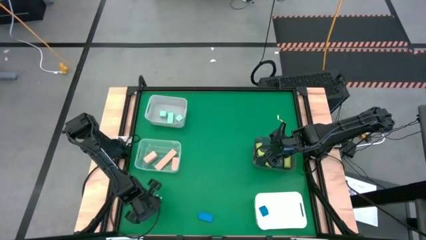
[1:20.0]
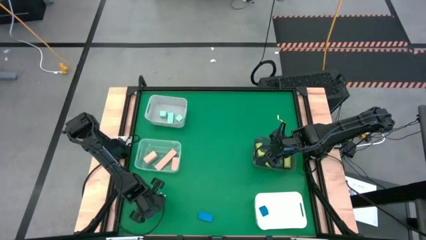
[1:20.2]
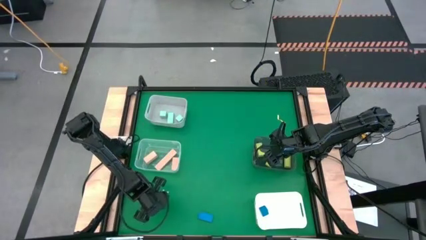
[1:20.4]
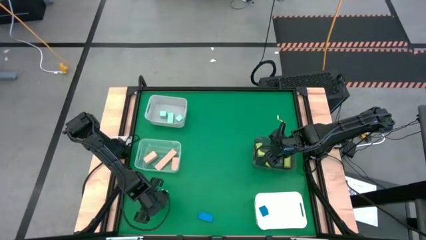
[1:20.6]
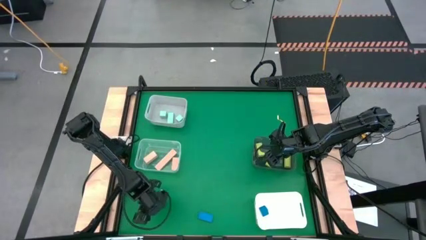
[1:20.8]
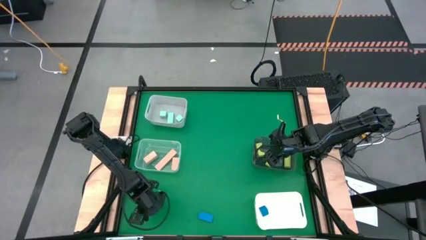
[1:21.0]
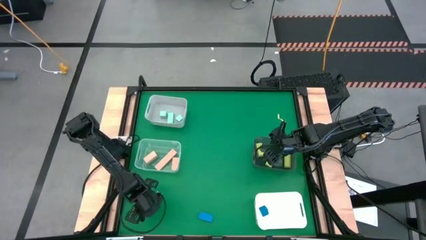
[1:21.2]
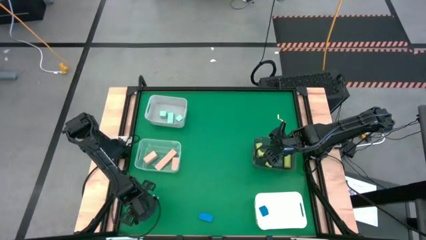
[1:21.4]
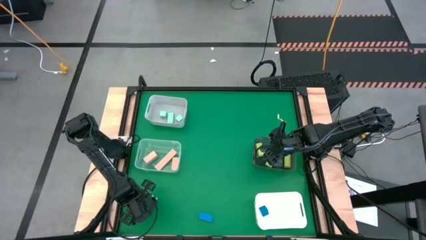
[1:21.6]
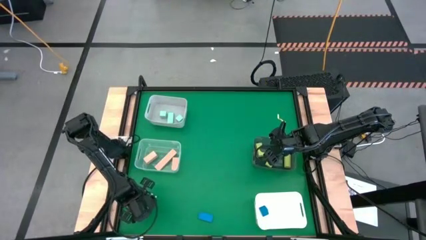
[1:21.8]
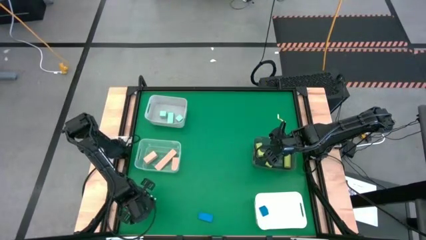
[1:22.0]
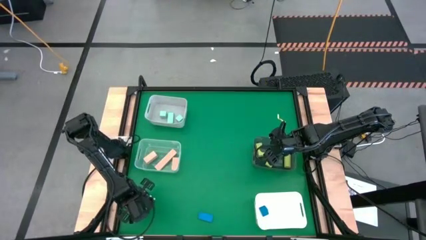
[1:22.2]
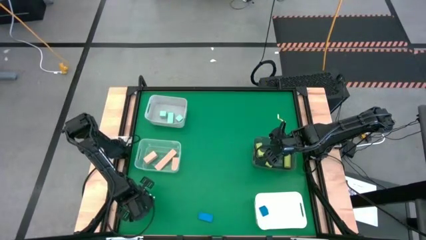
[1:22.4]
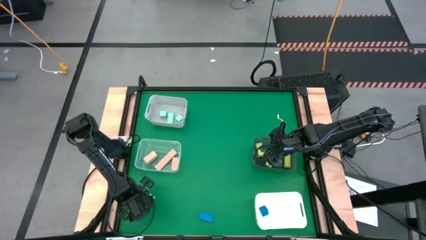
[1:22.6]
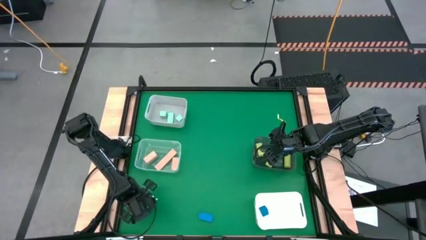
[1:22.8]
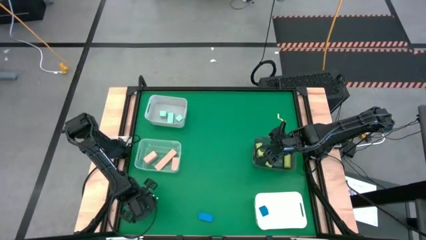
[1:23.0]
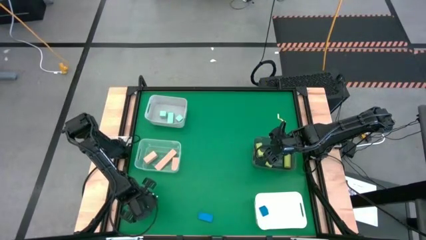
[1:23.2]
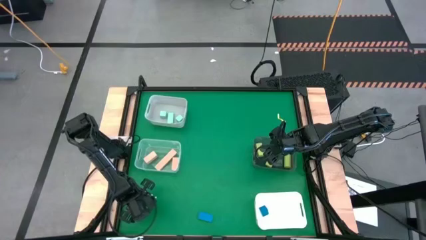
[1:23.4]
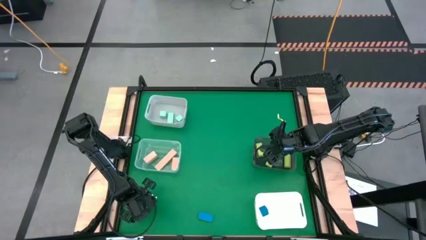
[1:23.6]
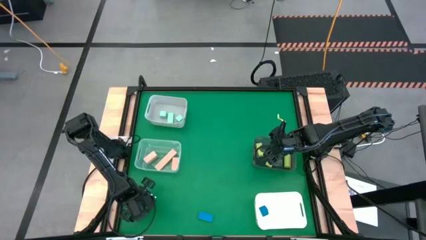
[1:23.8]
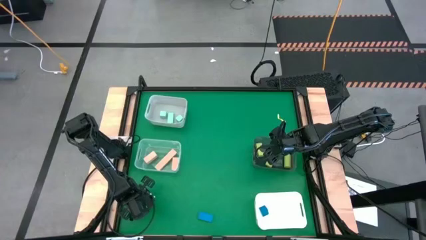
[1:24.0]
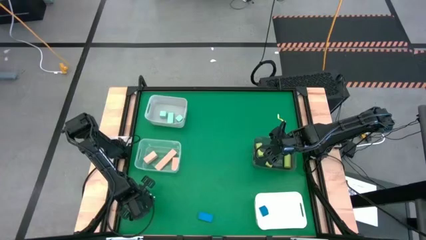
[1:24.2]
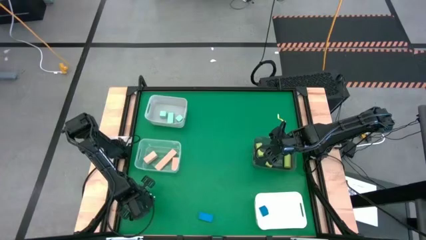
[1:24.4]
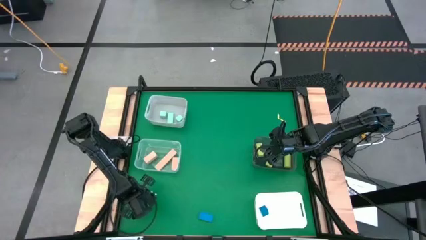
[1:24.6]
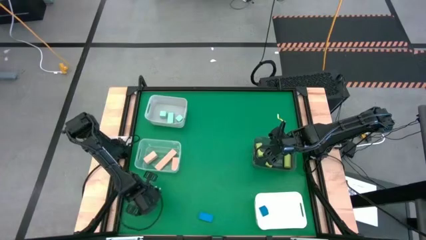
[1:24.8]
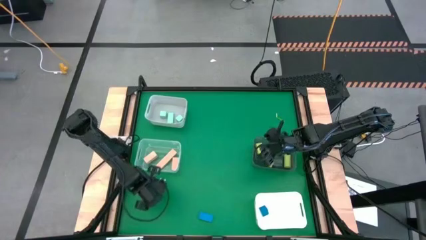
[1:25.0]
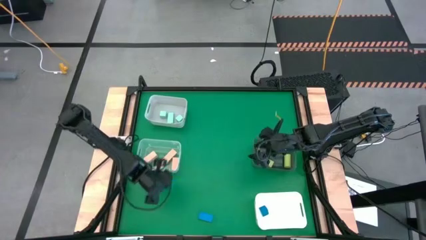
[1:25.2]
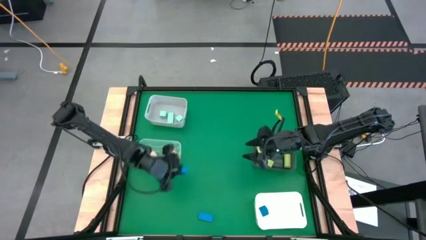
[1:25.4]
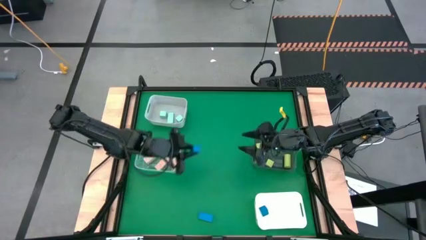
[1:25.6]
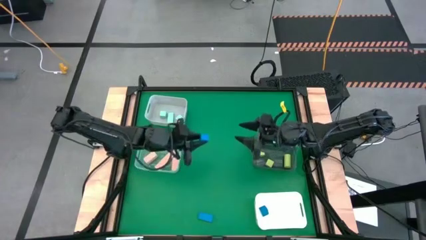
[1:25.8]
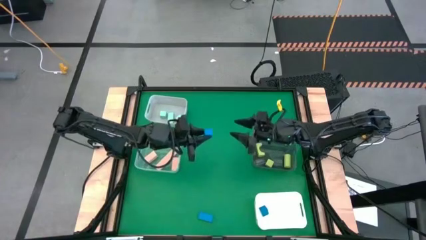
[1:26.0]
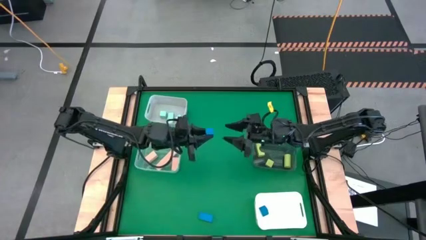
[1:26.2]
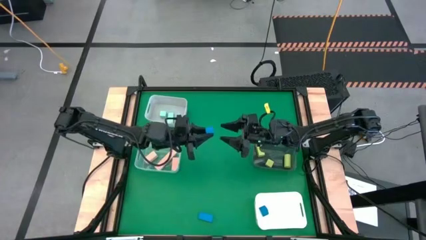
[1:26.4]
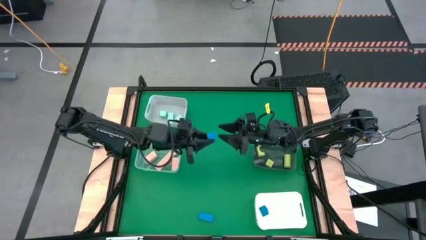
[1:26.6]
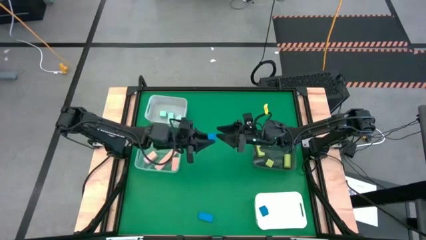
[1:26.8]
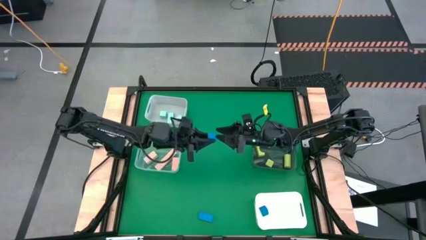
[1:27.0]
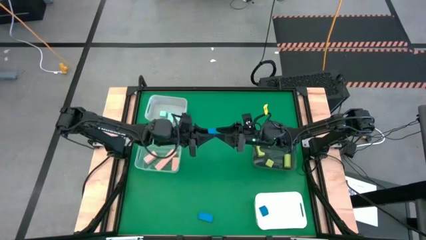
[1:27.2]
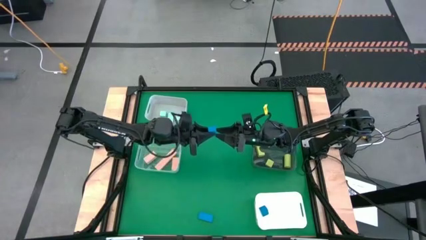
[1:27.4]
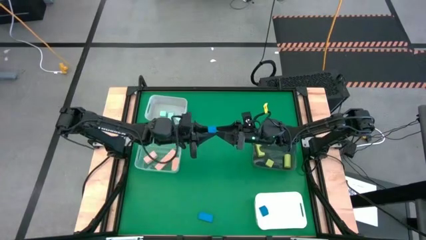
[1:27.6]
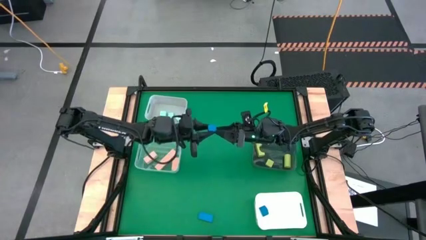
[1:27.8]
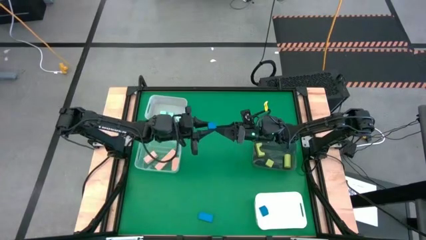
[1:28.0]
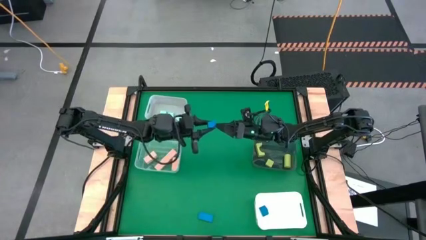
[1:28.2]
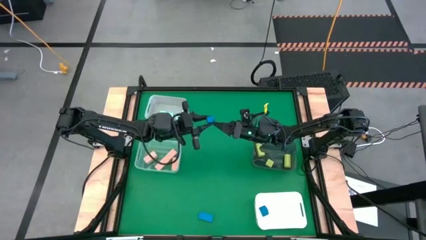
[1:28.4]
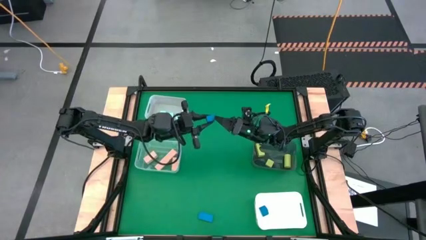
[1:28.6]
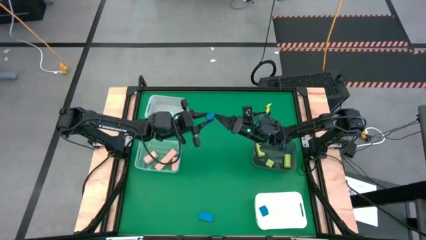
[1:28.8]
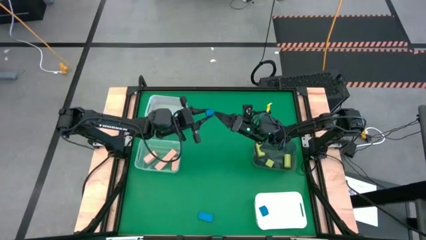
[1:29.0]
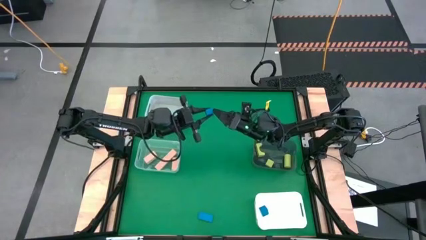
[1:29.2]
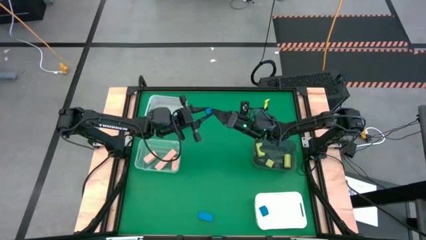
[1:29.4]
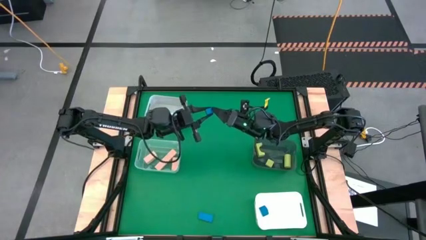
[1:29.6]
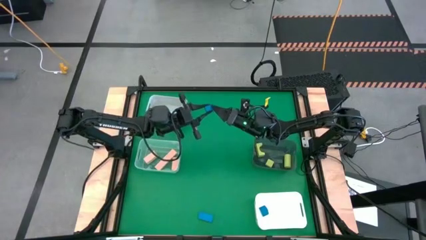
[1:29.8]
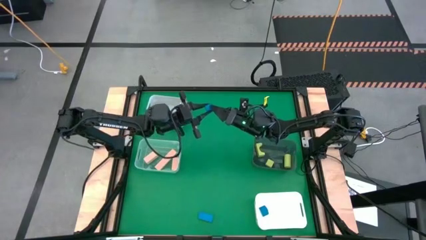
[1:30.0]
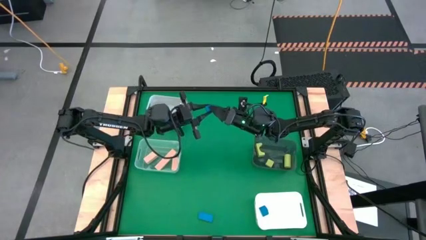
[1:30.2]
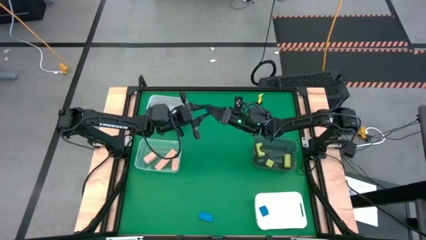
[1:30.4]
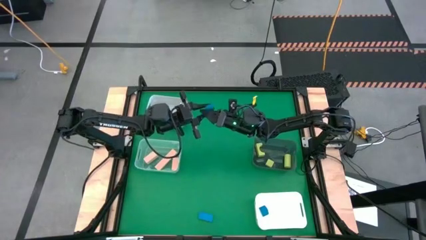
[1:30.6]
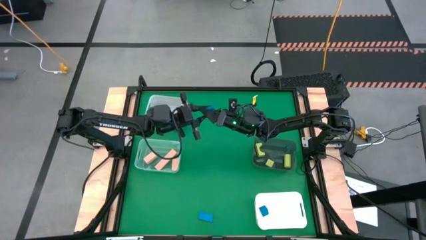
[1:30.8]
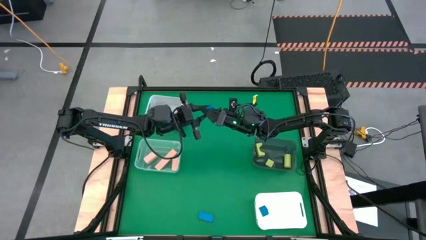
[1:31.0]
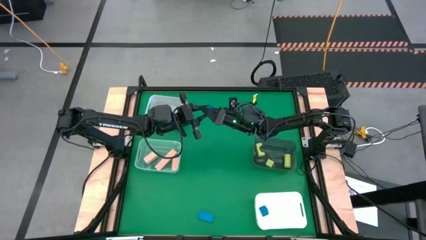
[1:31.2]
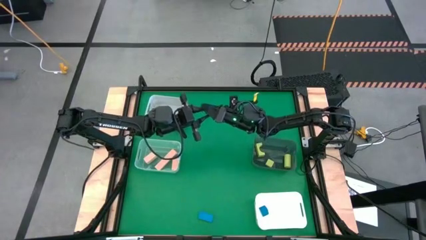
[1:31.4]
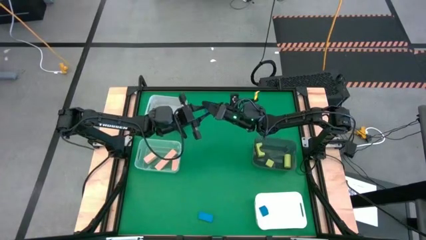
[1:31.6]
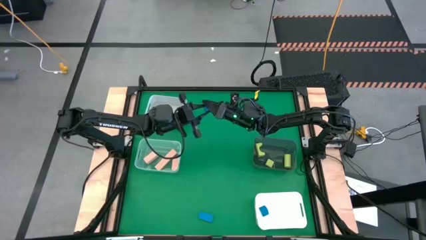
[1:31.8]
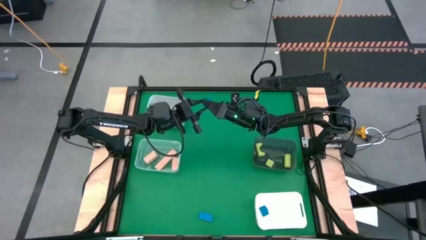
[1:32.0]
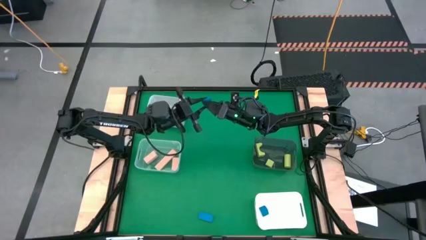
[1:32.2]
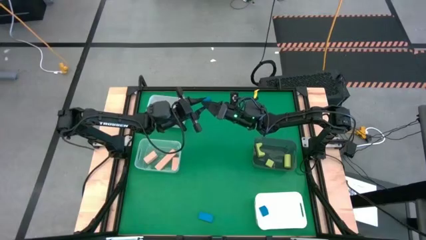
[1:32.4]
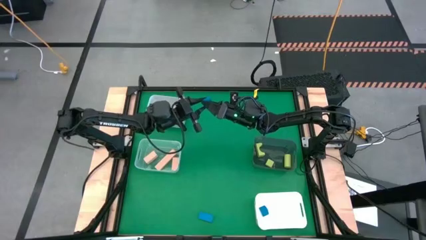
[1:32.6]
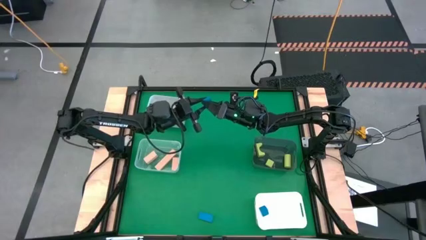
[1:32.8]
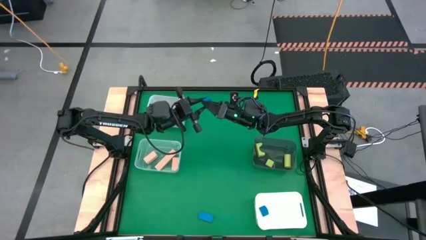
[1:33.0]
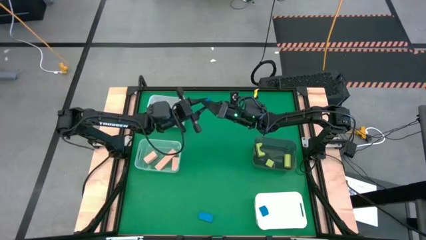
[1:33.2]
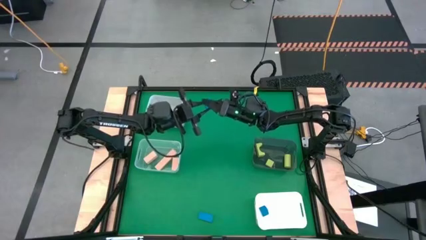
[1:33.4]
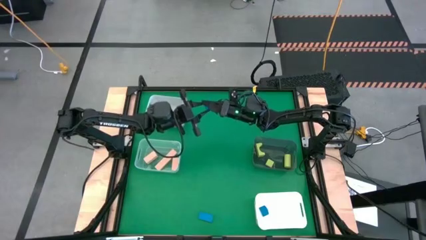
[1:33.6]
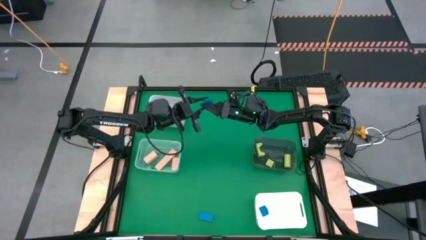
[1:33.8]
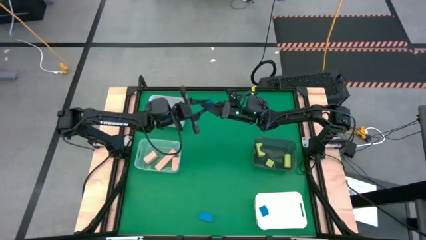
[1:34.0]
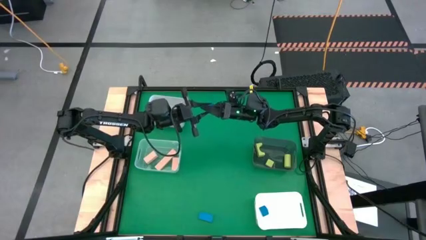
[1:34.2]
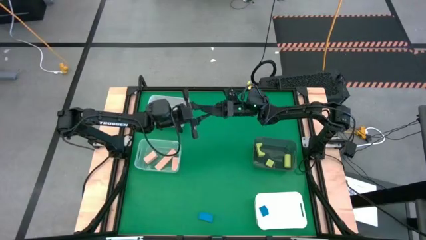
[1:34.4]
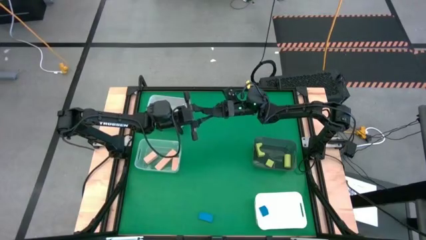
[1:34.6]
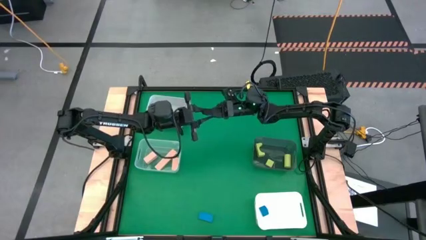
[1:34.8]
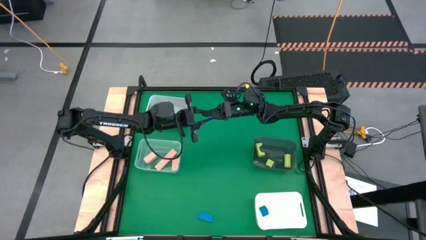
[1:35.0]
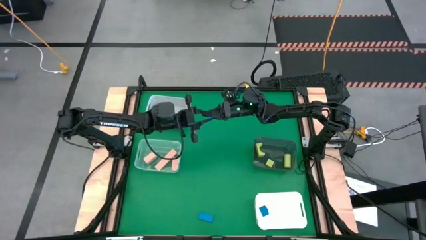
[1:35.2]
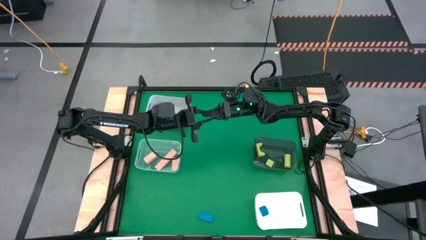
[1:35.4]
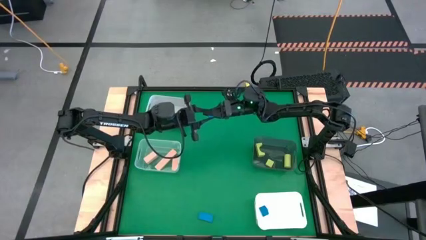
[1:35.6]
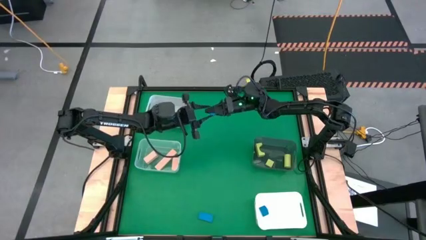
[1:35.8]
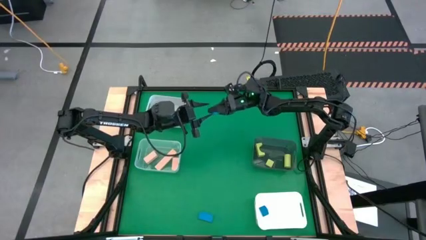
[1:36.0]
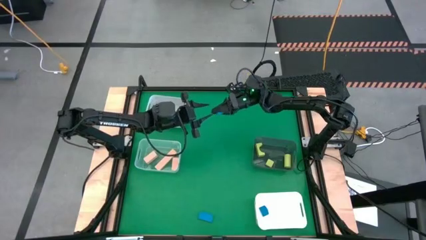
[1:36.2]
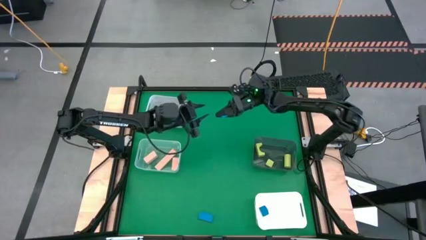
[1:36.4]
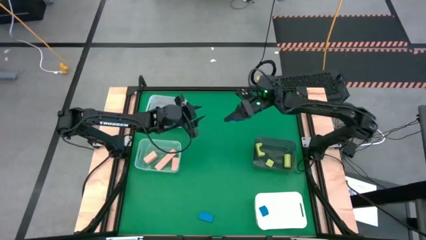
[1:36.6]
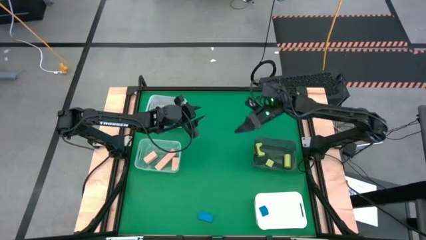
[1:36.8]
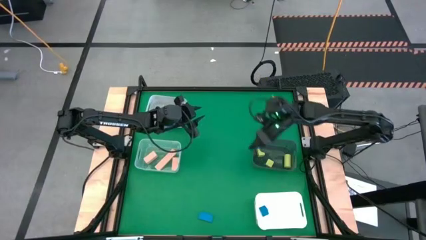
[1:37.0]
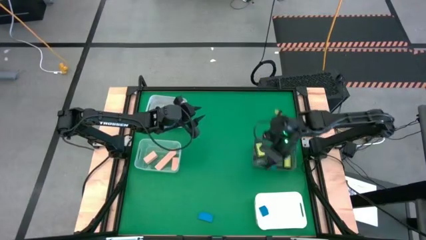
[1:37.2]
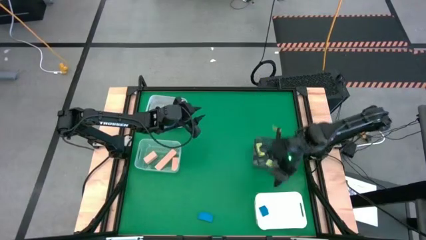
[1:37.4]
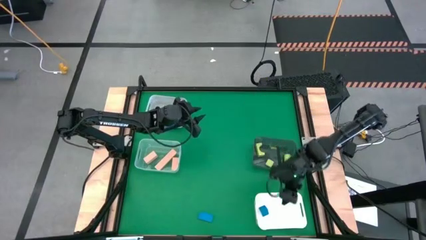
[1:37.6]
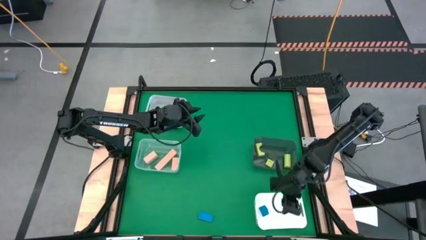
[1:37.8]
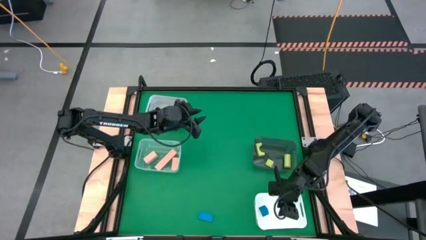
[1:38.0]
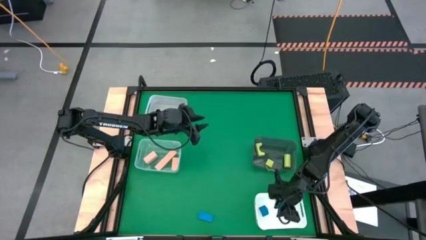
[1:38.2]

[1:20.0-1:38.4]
Task: Sort & place blocks by color
Put the left blue block into the white bin
